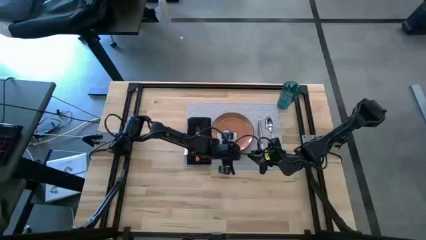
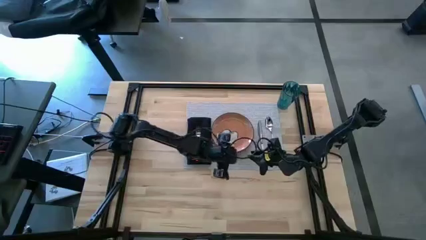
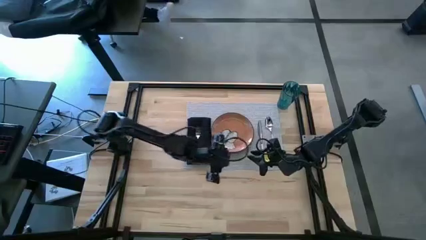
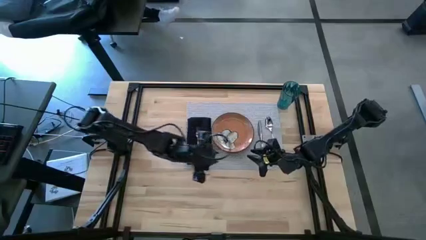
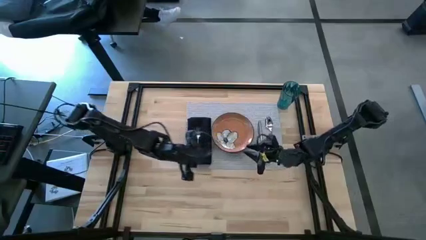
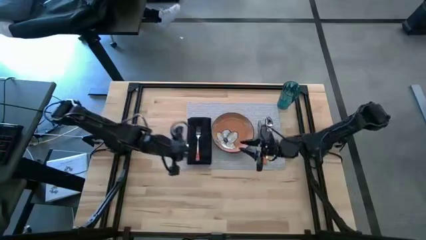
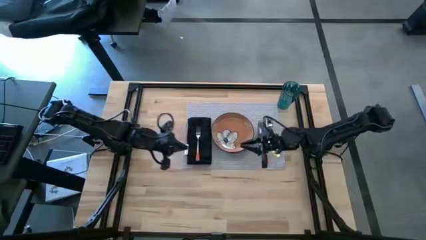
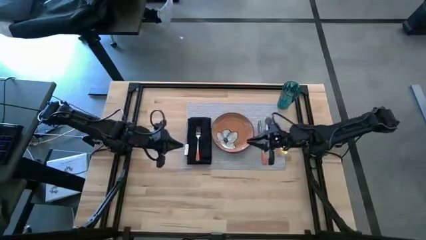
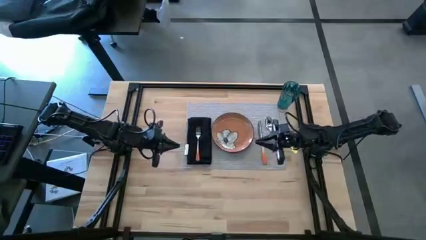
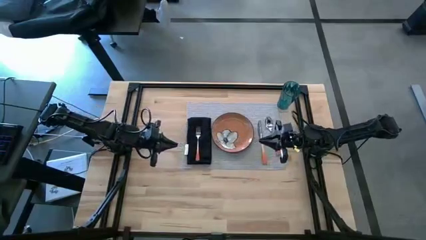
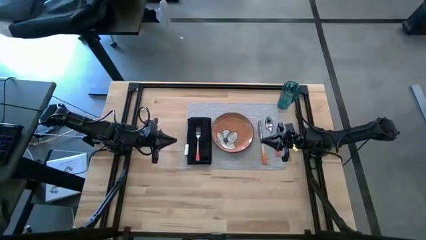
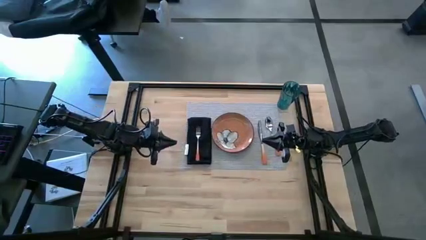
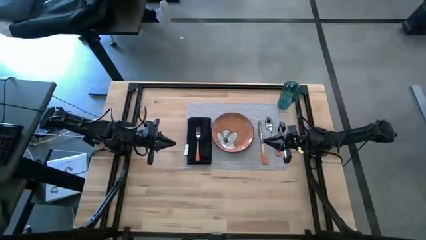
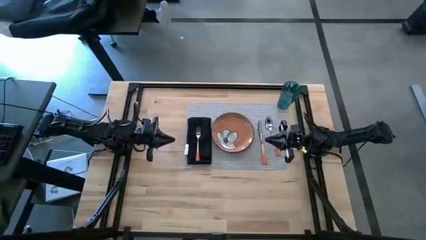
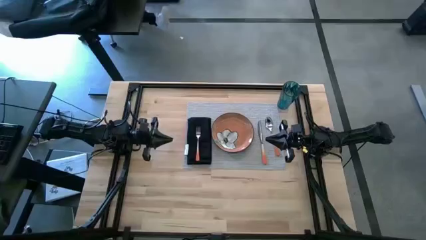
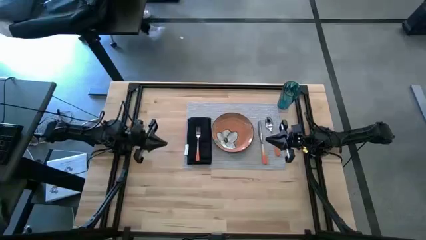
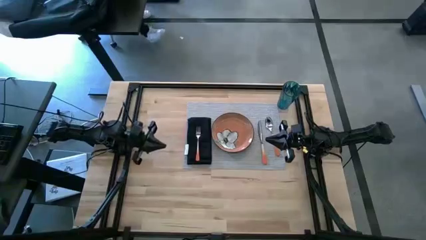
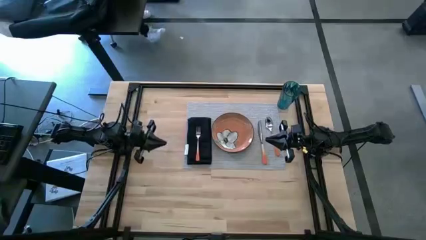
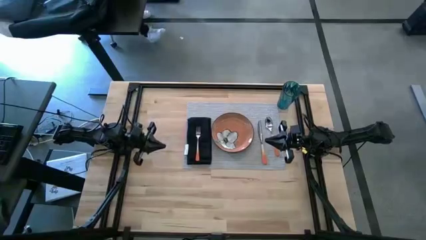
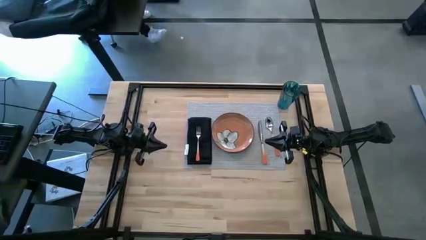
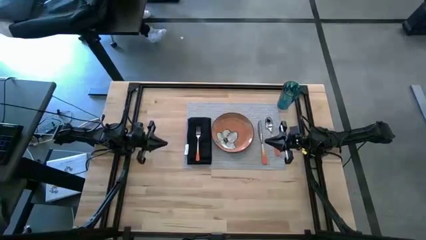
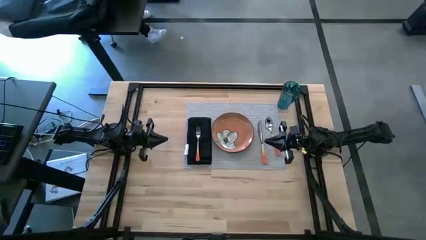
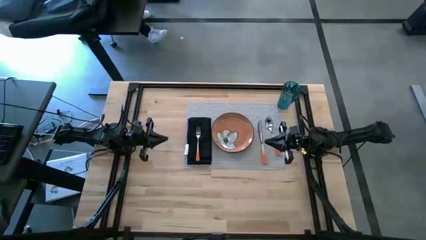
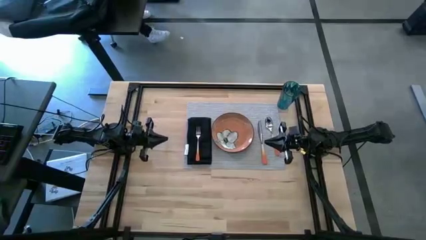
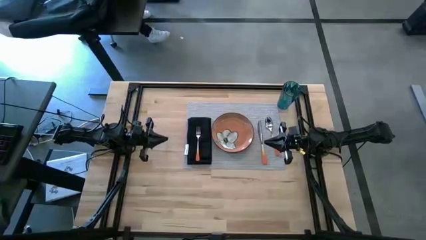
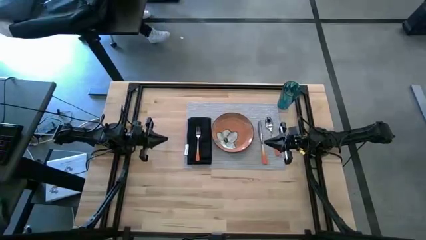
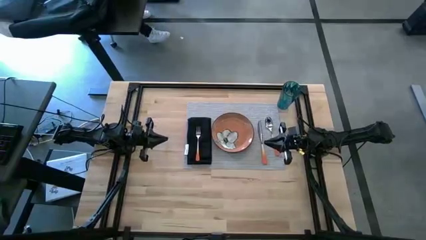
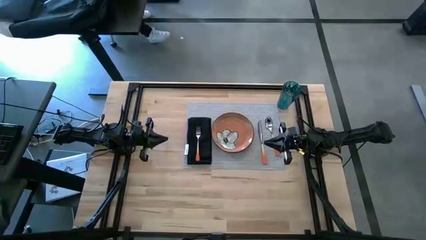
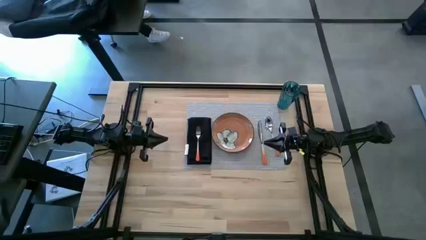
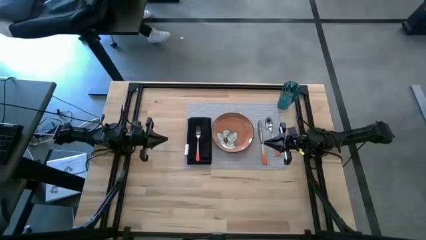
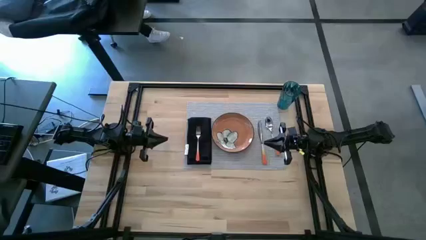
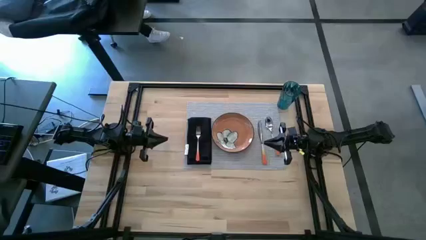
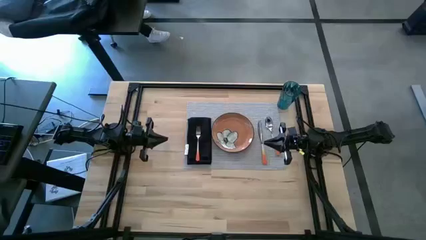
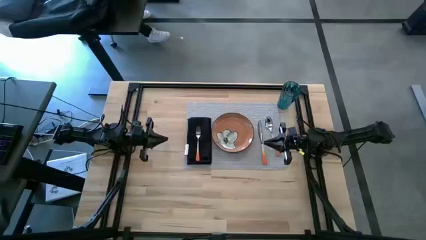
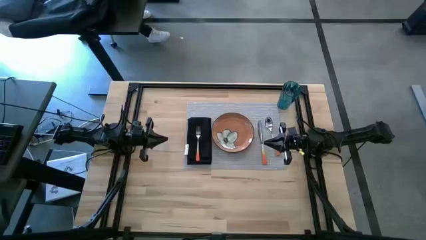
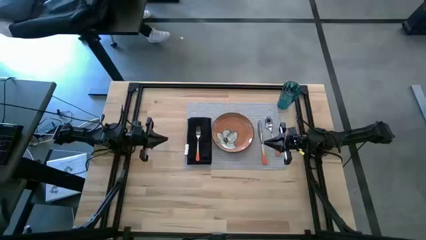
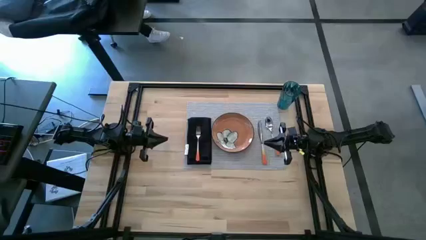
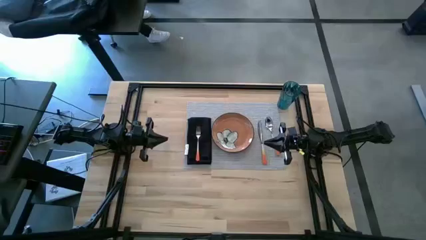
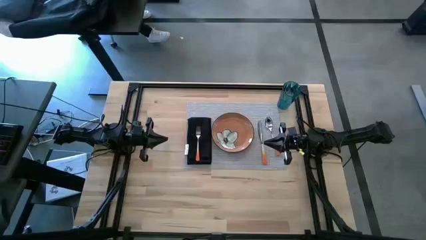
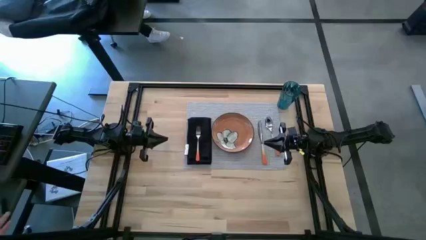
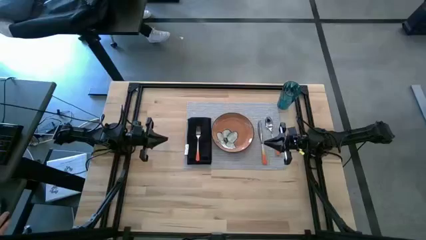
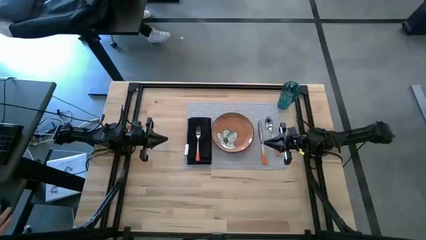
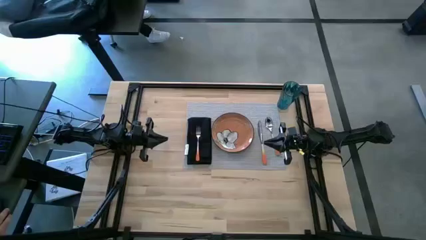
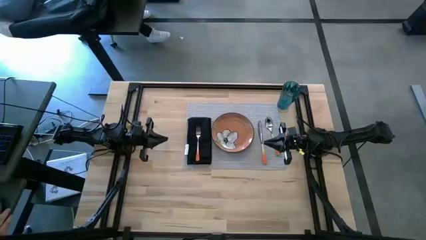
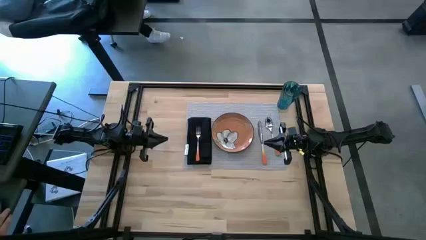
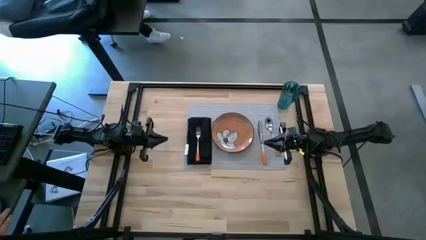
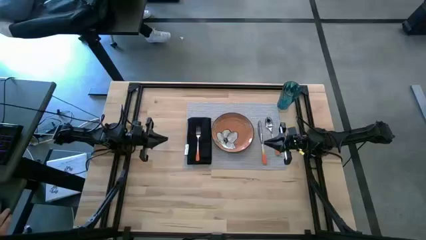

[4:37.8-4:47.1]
Task: Set table place
Return to Home Position

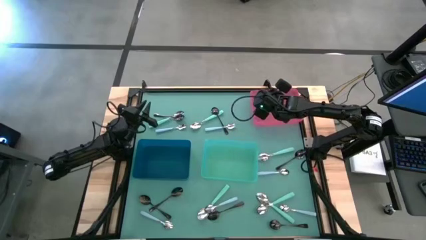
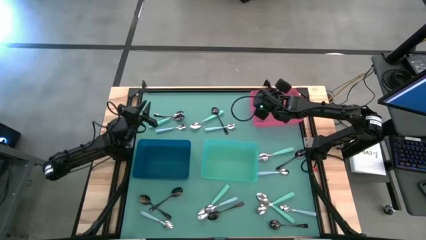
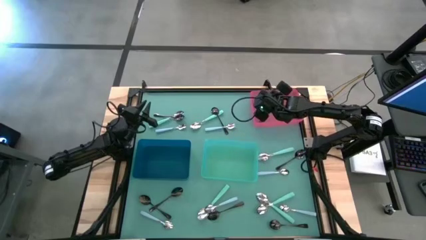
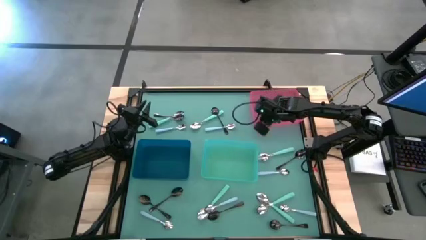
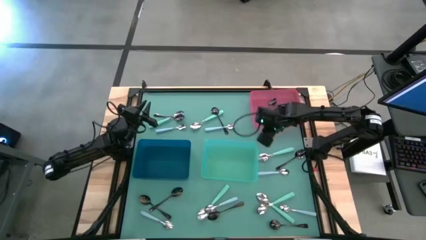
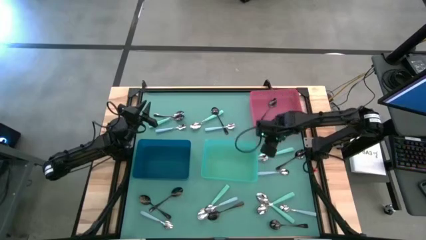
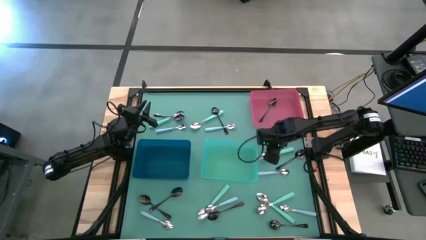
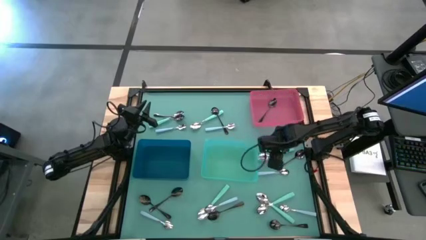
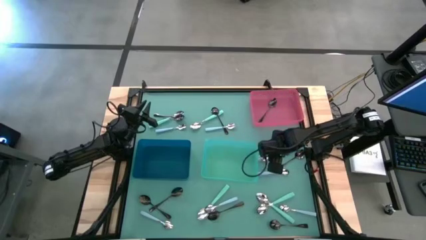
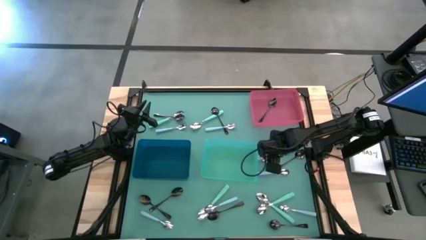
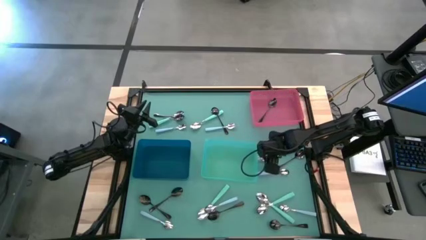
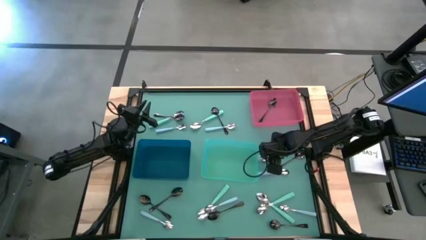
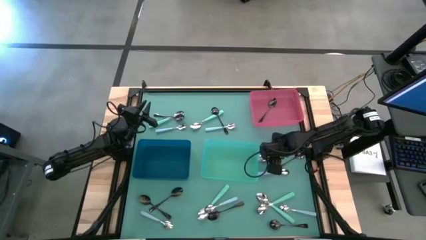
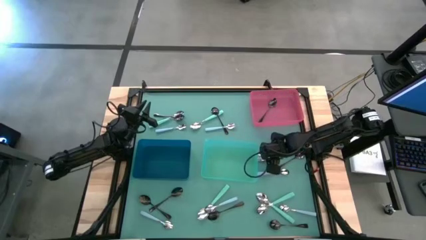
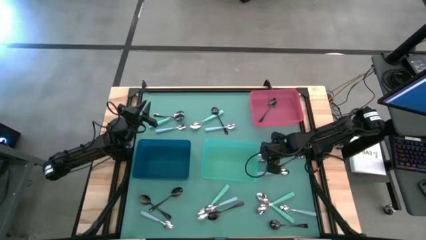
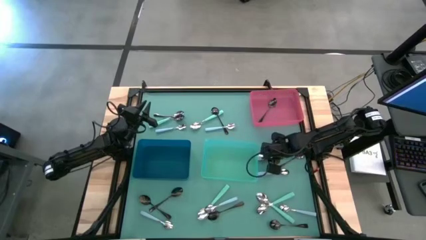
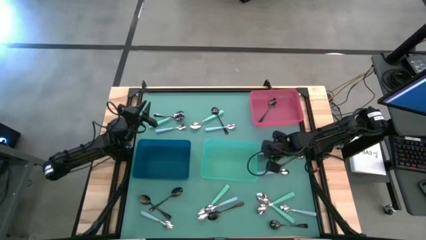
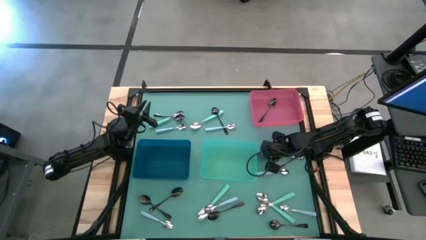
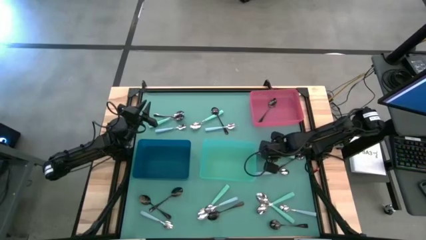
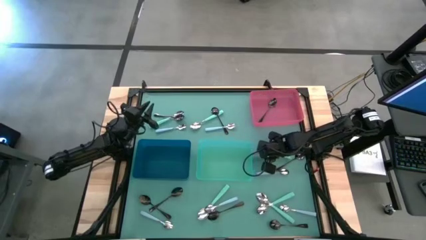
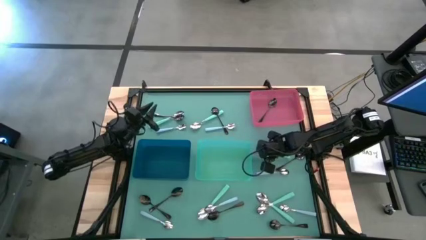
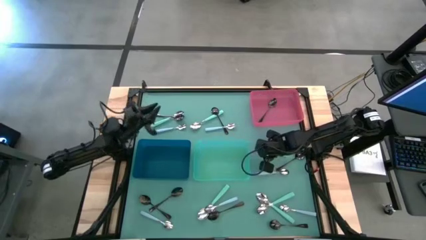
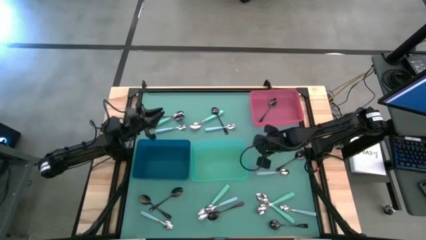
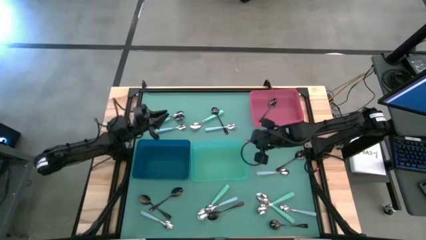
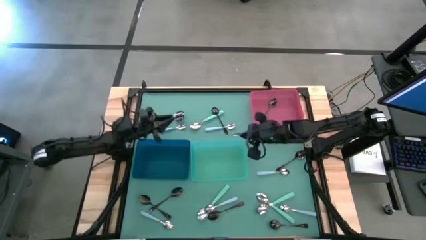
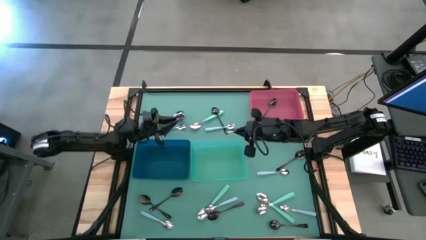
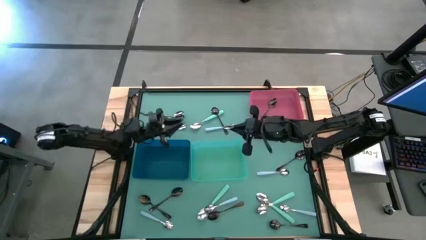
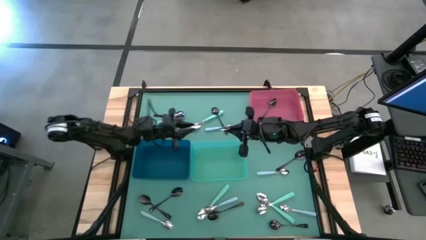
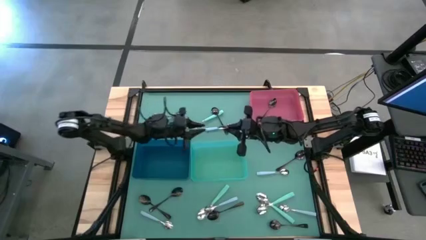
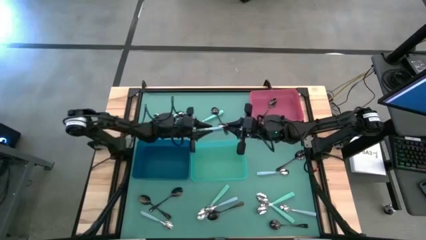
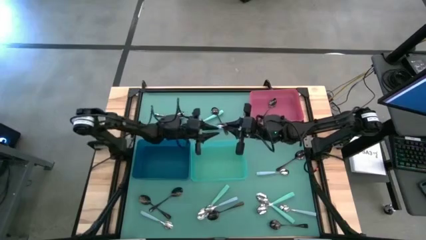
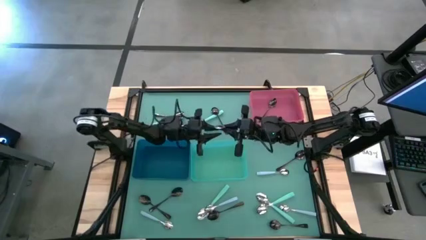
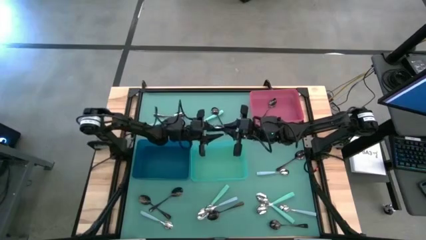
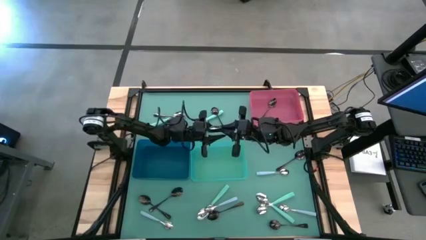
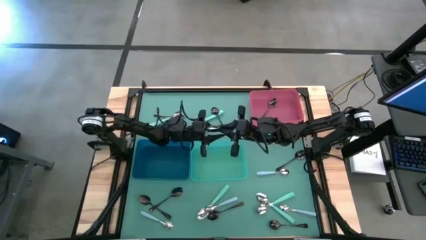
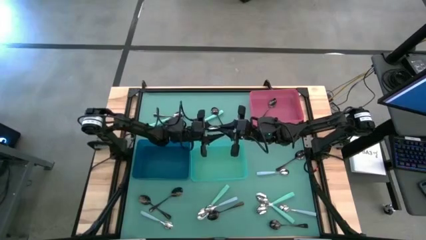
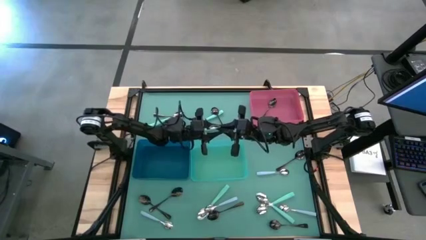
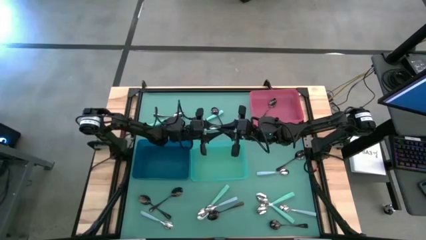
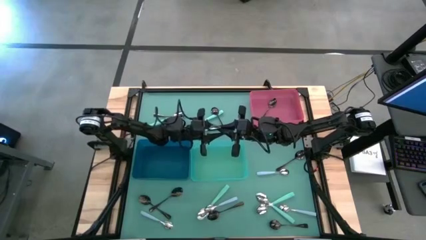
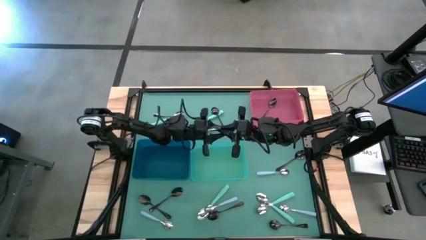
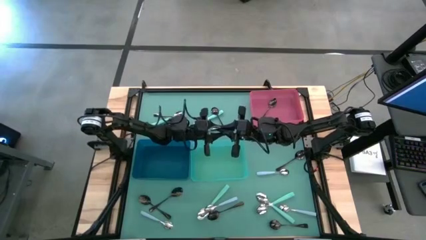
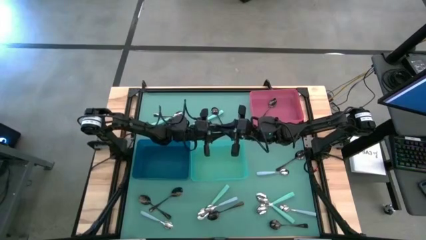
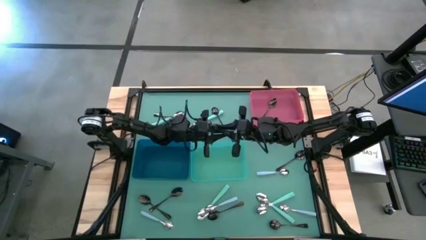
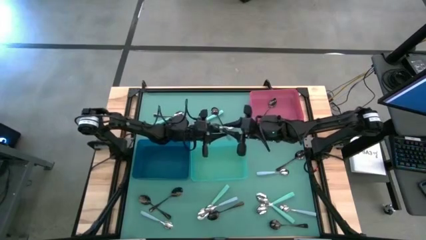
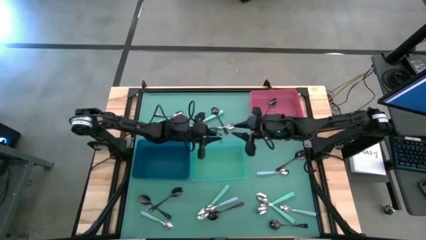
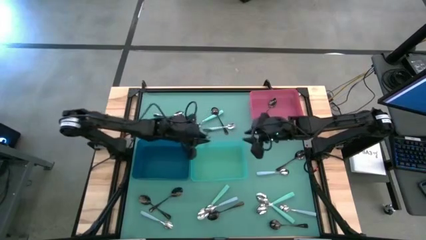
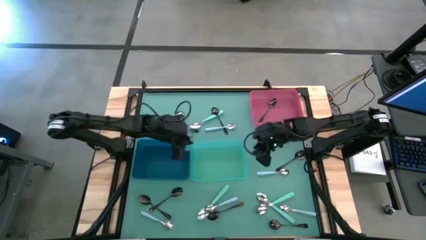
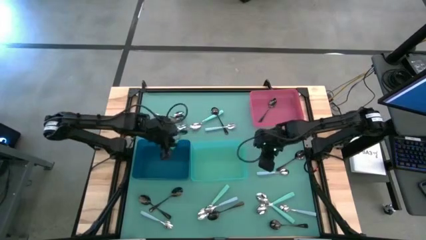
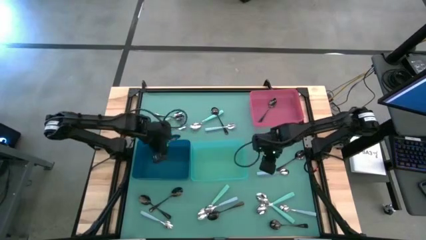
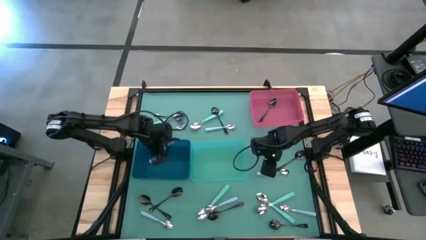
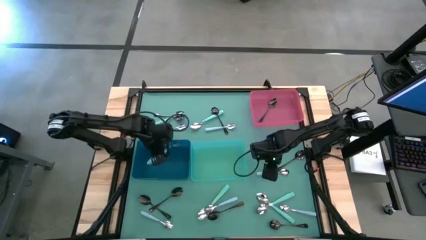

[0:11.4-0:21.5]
Task: Sort silverware by color (type)
Put the green spoon into the blue bin
